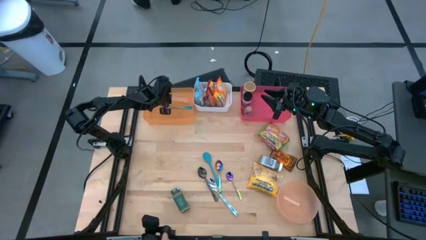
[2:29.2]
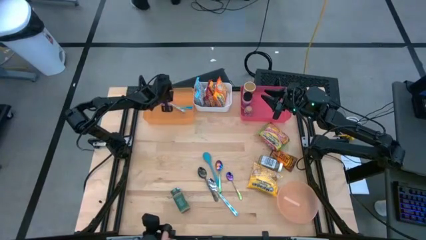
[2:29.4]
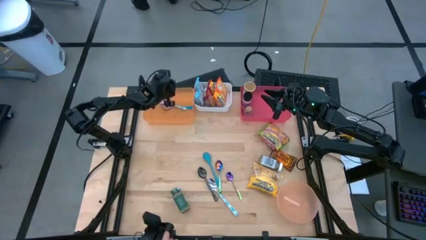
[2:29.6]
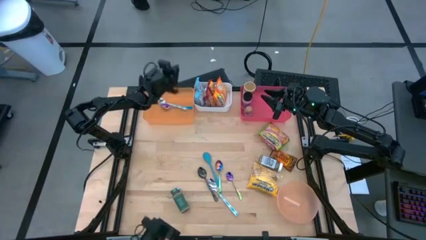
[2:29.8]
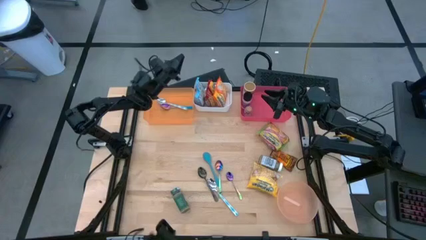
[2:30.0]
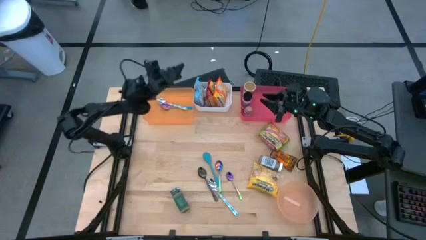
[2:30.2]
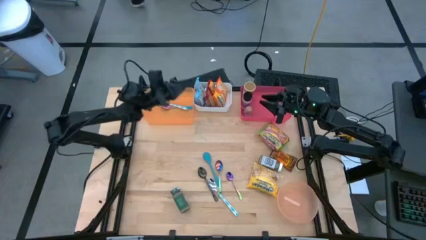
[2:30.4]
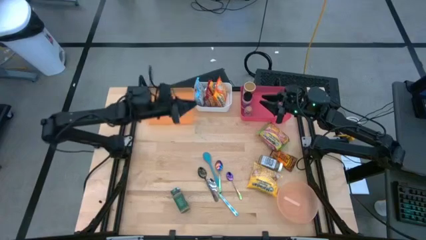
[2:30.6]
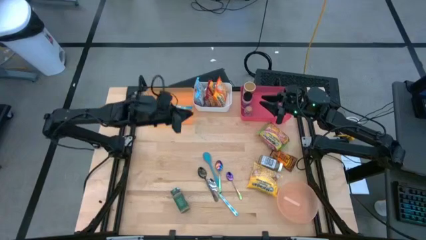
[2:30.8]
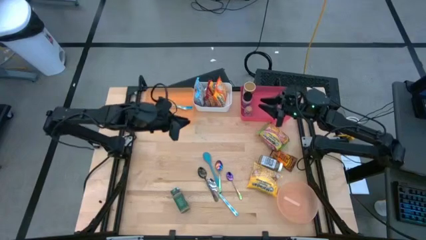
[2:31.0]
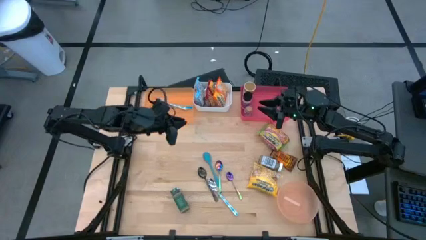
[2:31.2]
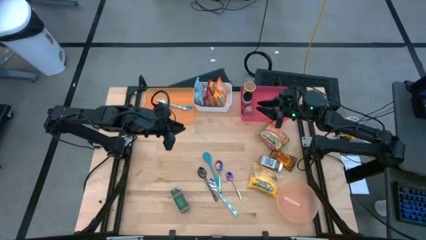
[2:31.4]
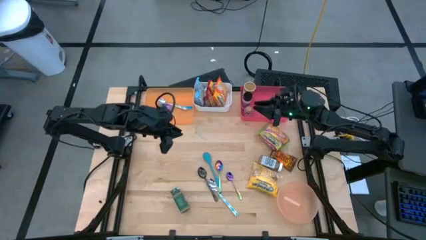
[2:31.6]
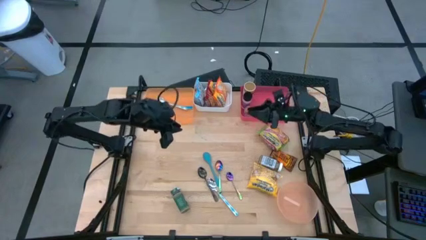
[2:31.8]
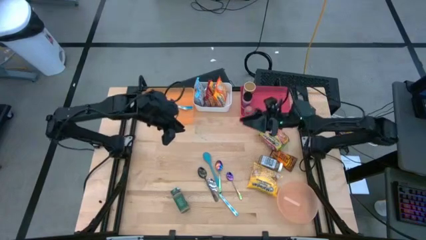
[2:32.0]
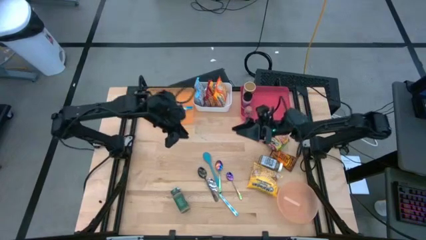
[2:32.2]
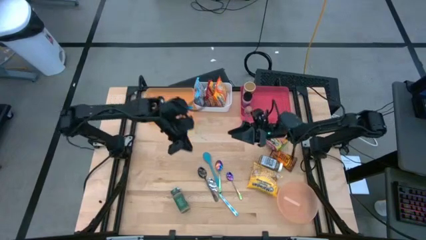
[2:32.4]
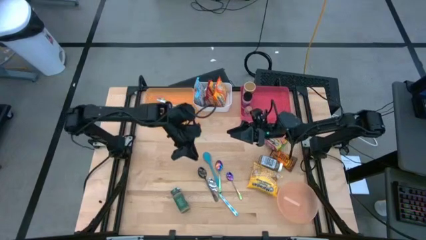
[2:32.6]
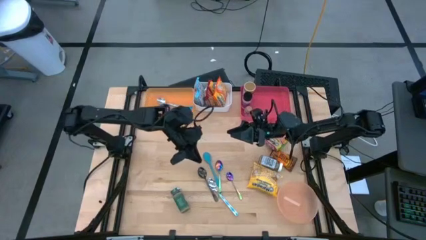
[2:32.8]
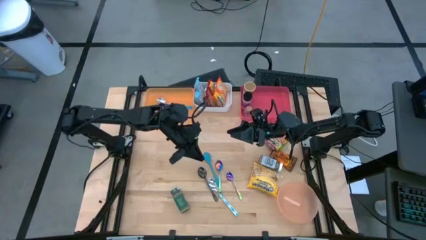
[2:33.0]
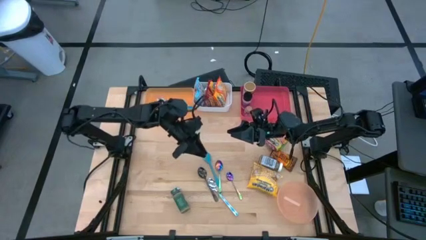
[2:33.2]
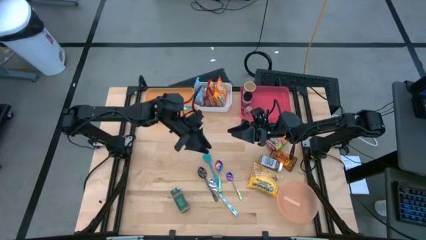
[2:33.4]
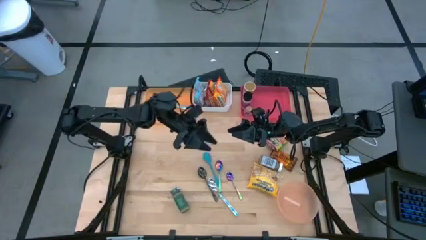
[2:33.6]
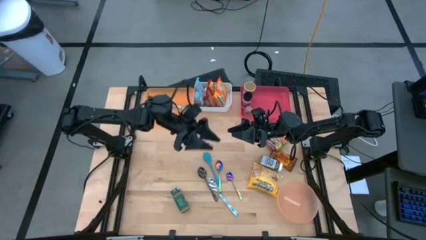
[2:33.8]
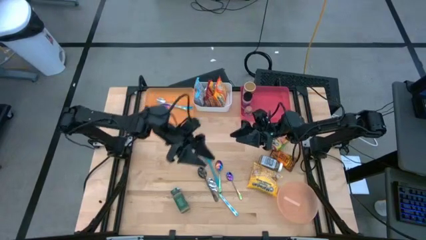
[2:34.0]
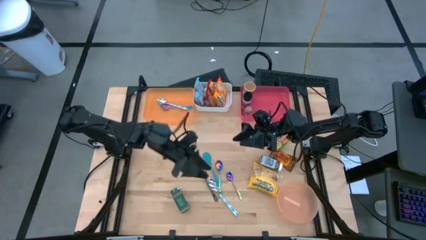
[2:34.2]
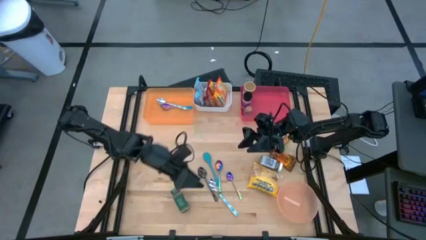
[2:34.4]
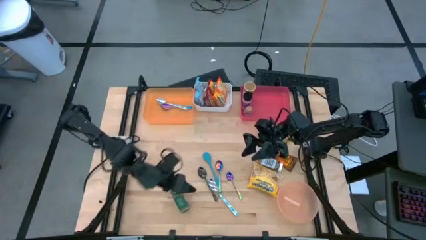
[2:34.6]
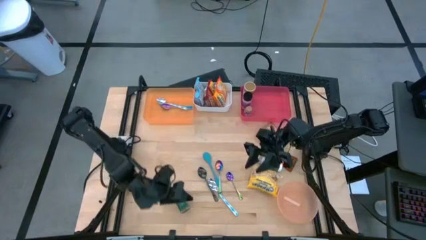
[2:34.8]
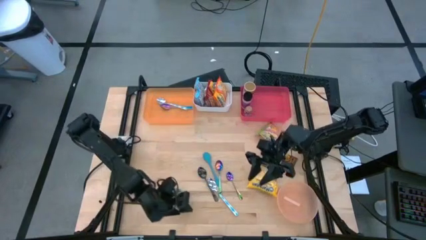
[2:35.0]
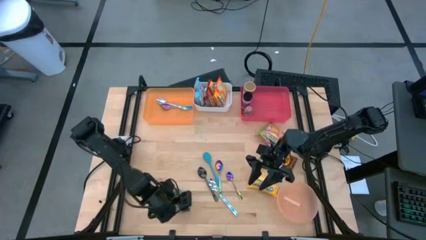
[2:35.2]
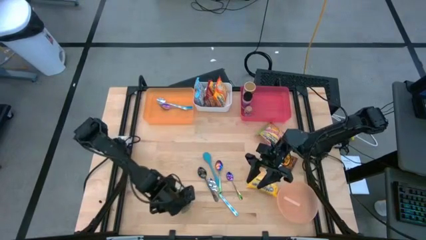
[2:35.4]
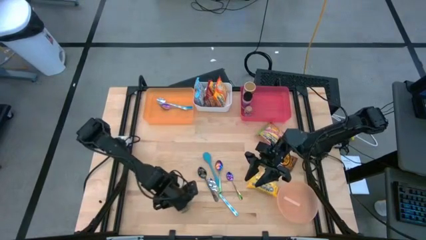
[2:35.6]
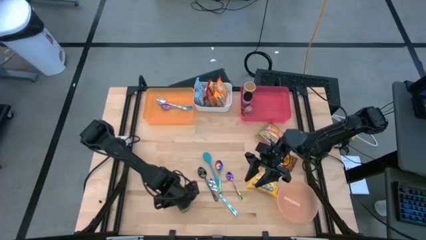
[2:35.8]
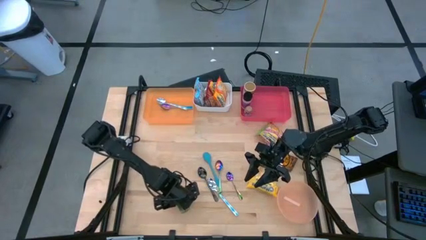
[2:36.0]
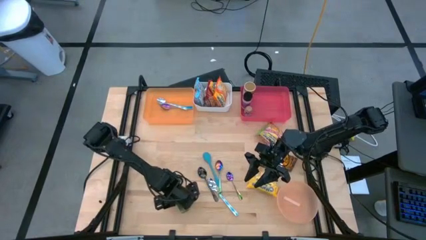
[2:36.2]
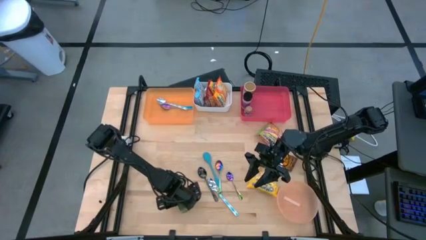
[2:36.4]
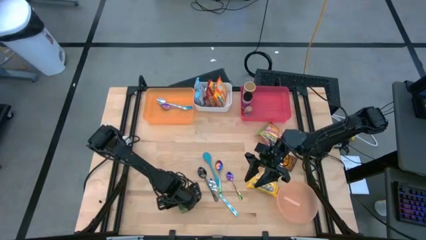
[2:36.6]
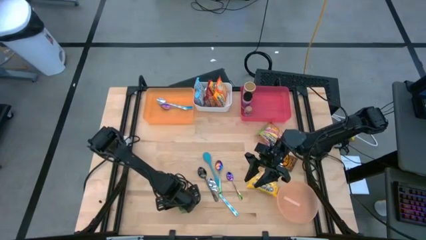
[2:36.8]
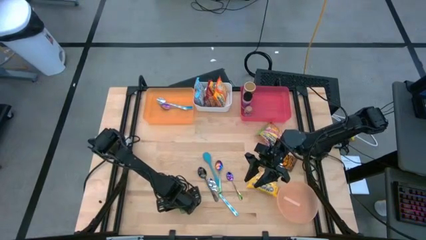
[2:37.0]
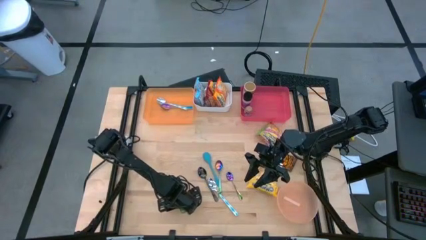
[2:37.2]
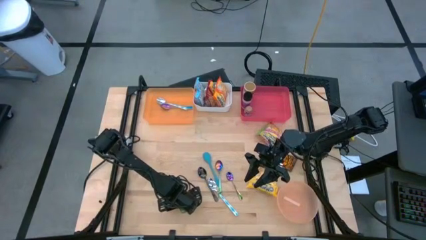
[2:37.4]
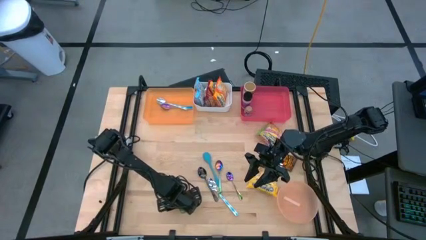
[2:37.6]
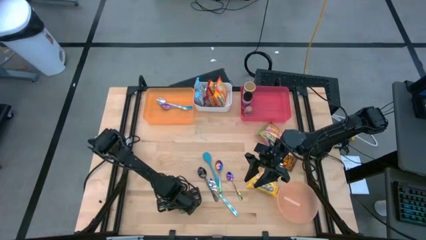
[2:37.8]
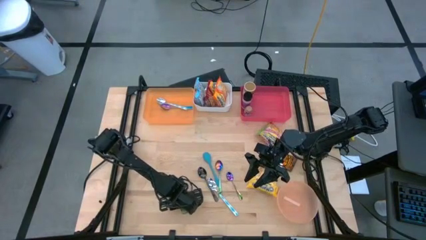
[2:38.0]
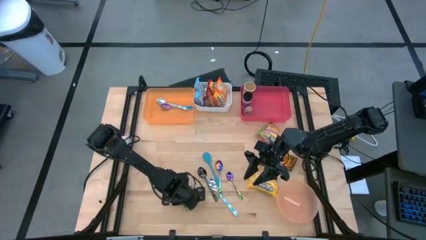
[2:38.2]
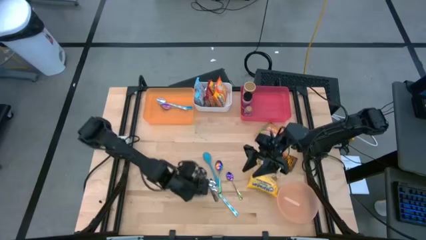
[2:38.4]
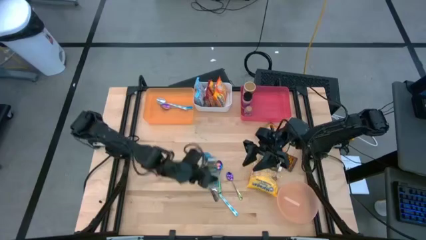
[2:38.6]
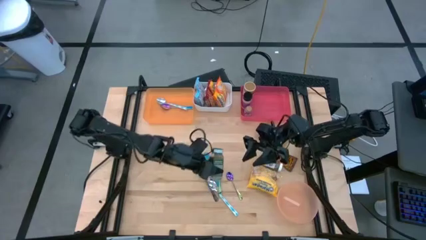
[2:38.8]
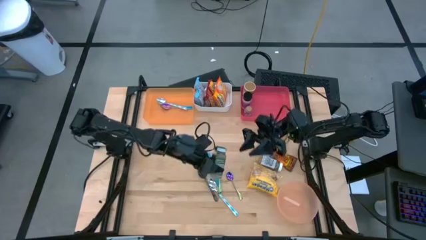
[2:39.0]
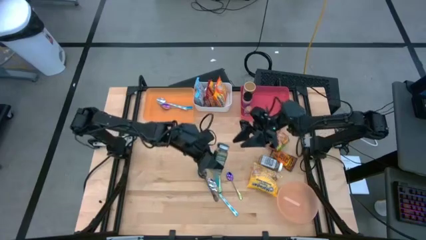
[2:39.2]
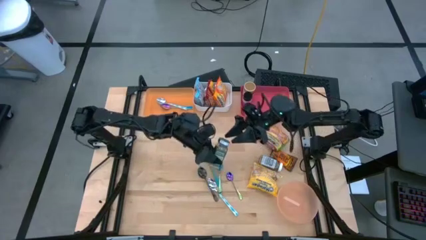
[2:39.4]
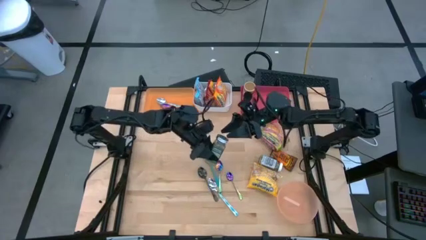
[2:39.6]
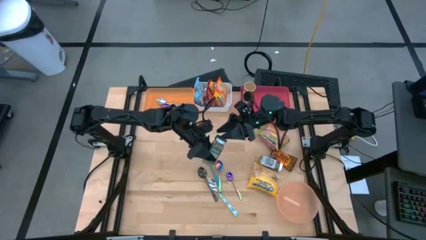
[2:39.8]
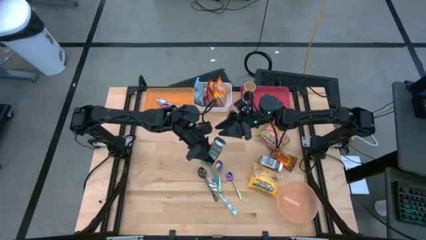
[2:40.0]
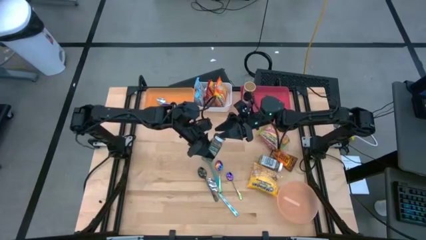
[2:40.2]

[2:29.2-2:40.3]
Task: Pick & Place Food Item
Put the green spice bottle into the red bin
